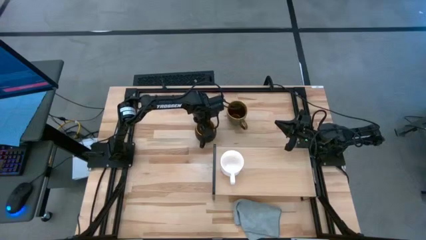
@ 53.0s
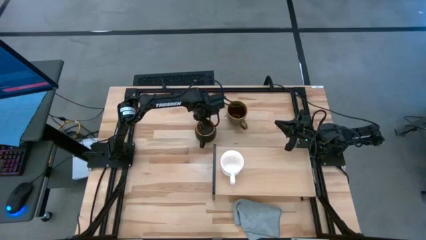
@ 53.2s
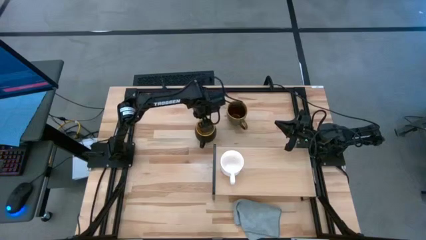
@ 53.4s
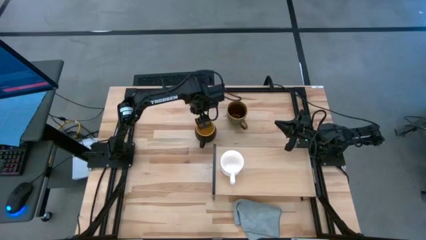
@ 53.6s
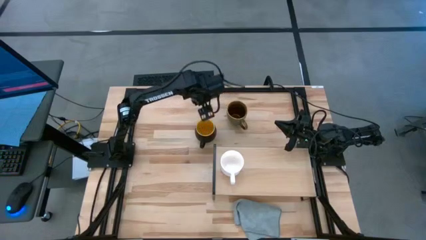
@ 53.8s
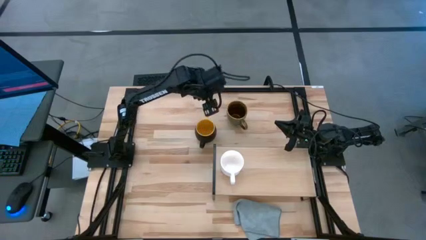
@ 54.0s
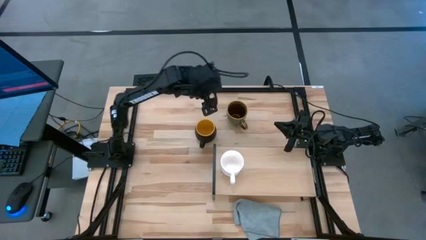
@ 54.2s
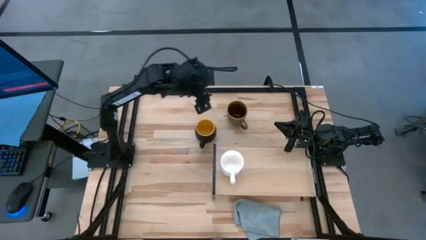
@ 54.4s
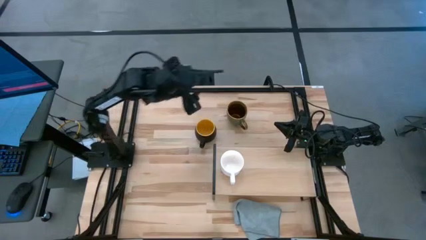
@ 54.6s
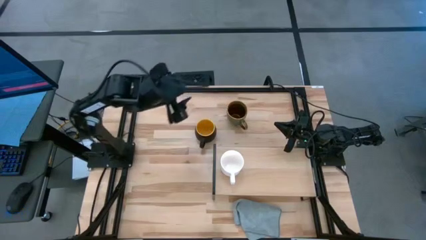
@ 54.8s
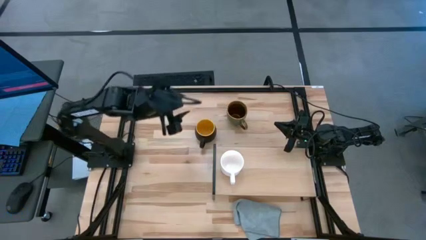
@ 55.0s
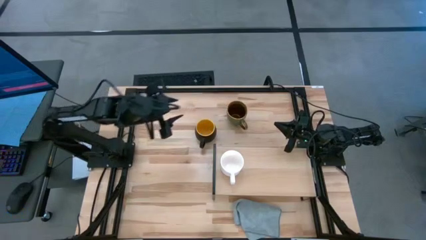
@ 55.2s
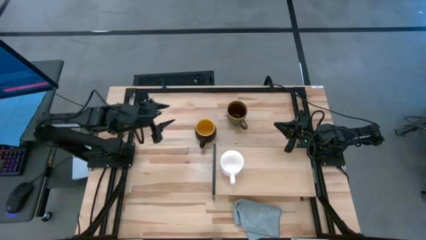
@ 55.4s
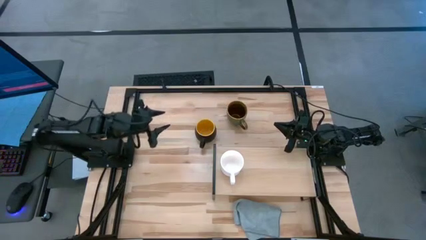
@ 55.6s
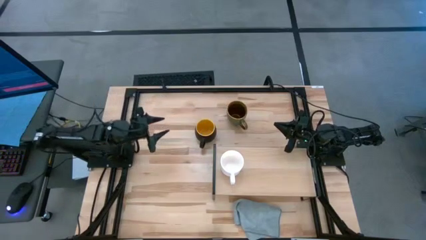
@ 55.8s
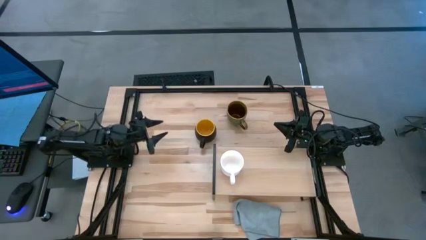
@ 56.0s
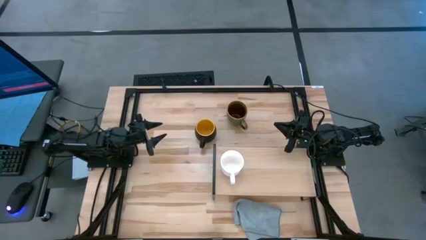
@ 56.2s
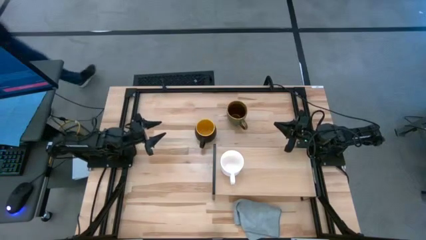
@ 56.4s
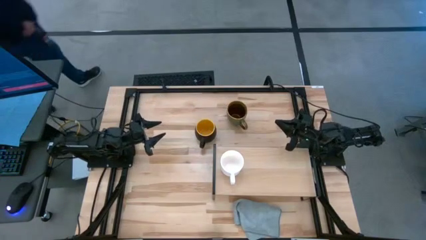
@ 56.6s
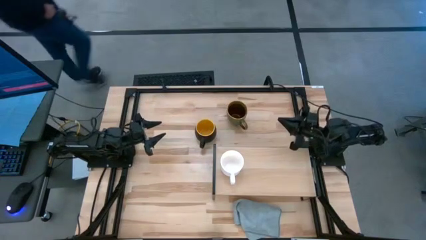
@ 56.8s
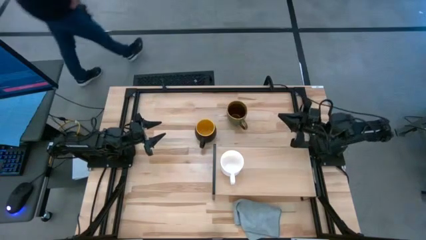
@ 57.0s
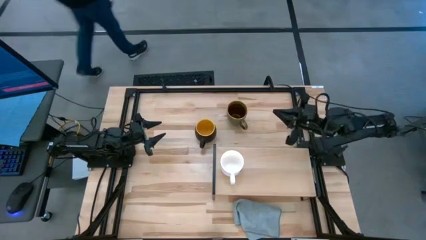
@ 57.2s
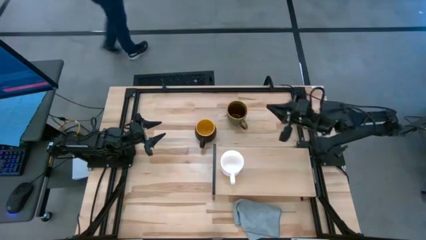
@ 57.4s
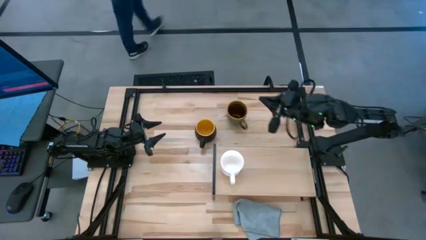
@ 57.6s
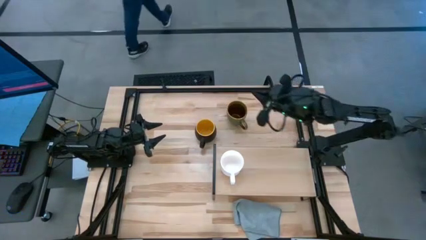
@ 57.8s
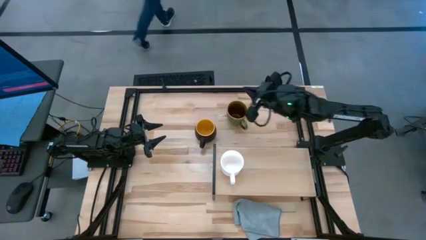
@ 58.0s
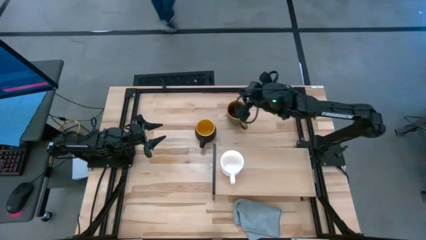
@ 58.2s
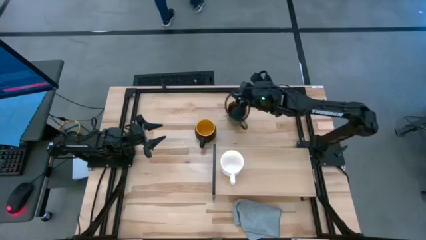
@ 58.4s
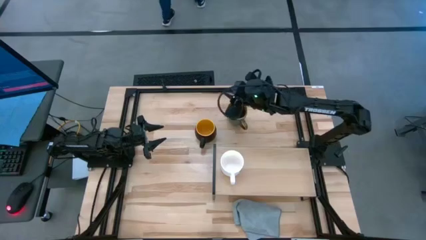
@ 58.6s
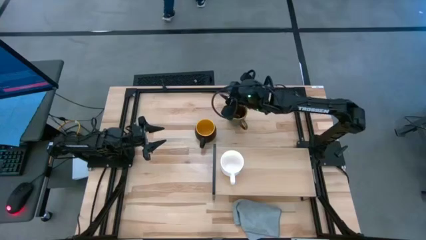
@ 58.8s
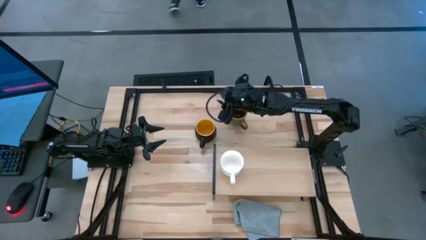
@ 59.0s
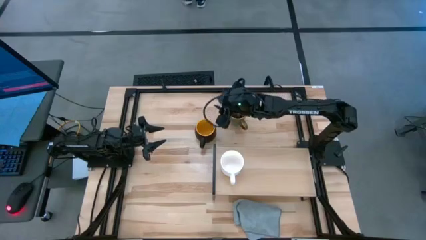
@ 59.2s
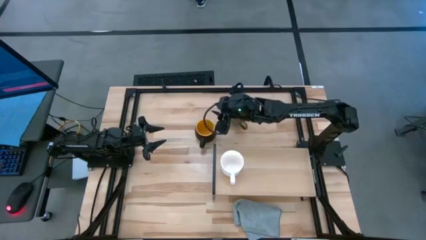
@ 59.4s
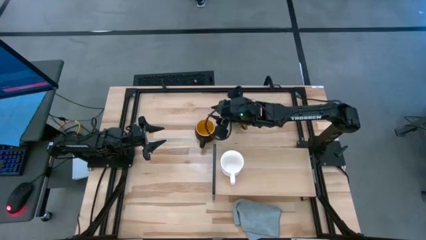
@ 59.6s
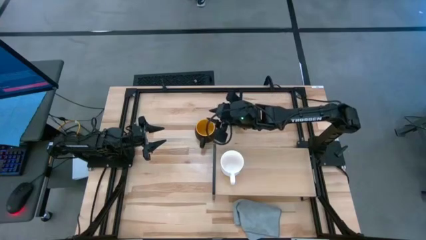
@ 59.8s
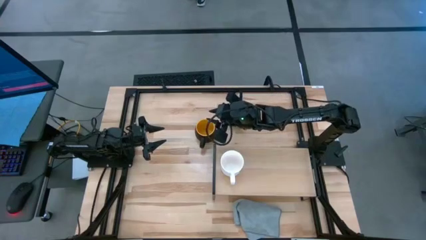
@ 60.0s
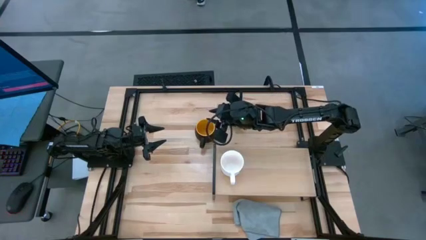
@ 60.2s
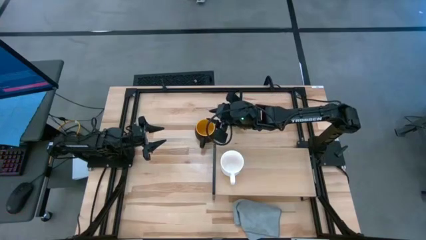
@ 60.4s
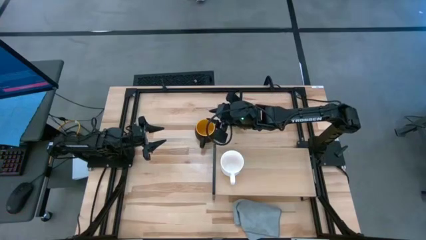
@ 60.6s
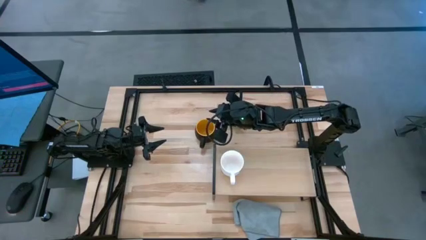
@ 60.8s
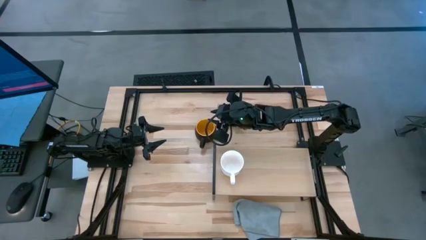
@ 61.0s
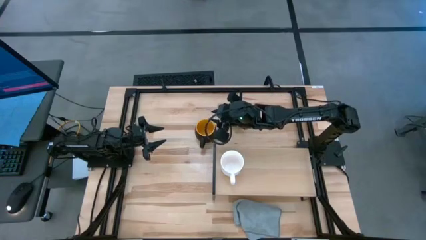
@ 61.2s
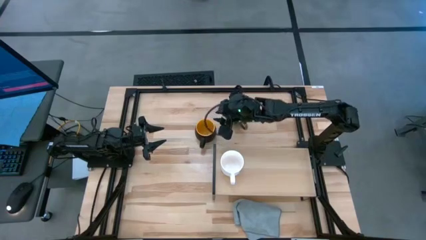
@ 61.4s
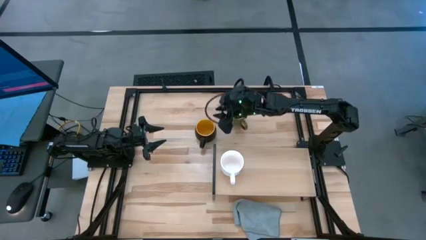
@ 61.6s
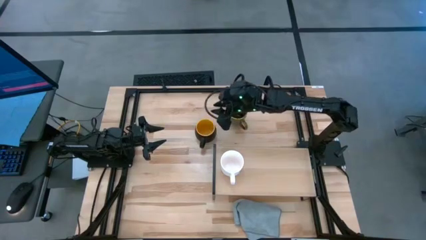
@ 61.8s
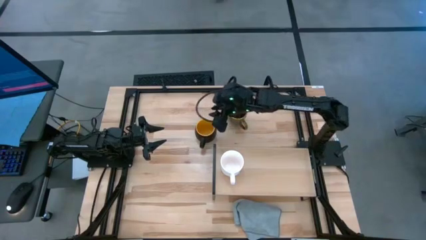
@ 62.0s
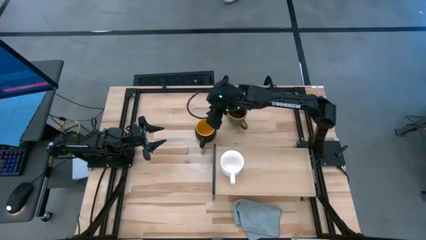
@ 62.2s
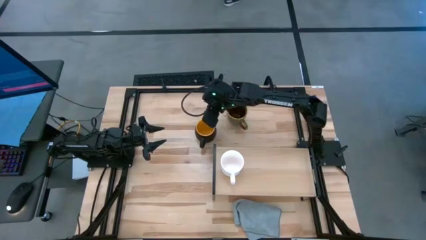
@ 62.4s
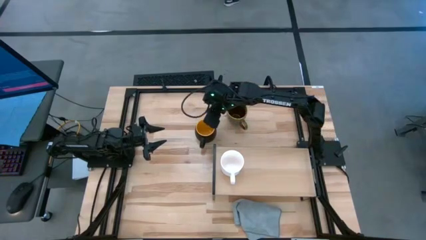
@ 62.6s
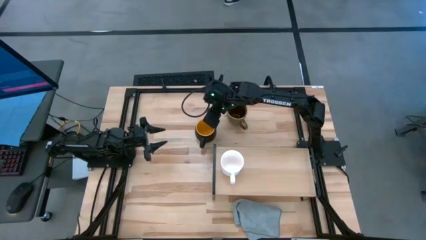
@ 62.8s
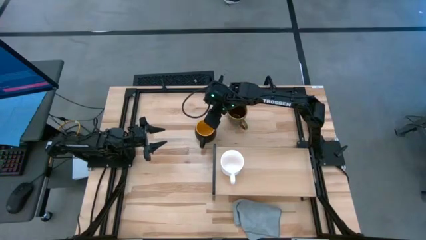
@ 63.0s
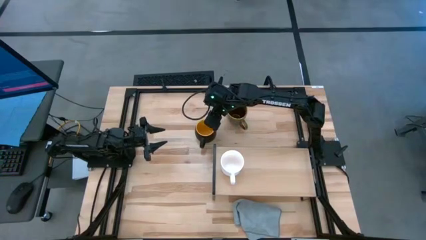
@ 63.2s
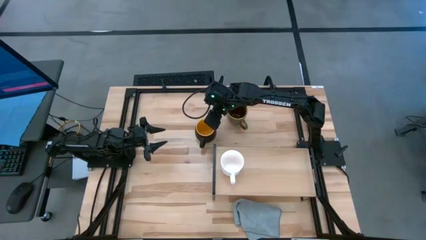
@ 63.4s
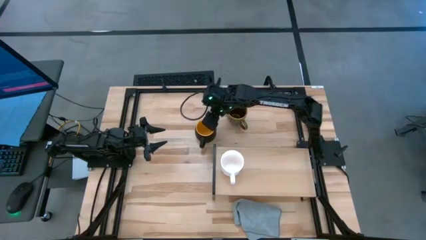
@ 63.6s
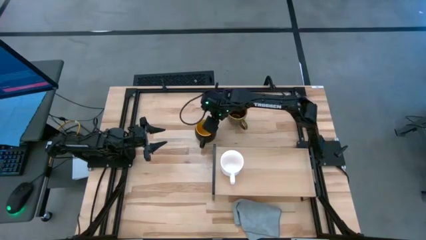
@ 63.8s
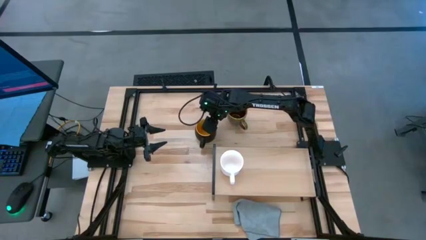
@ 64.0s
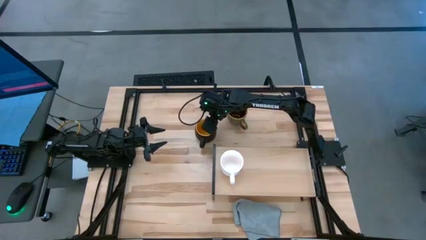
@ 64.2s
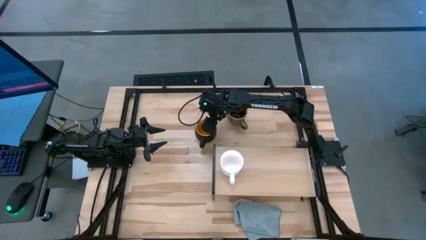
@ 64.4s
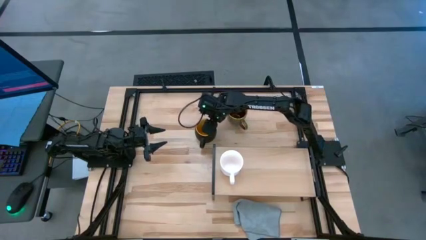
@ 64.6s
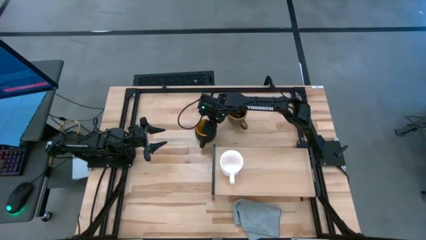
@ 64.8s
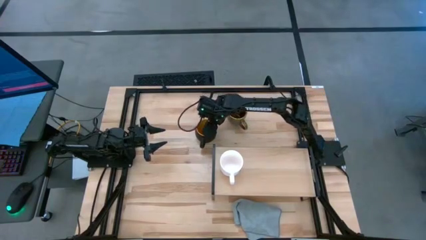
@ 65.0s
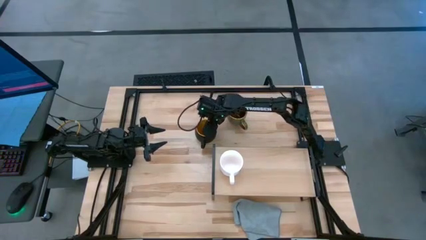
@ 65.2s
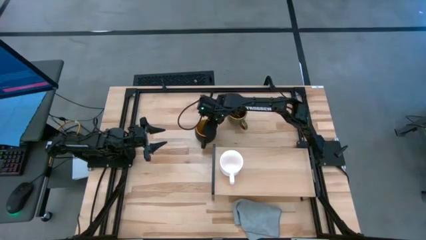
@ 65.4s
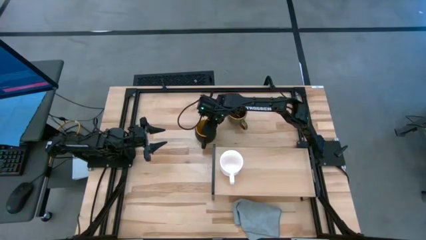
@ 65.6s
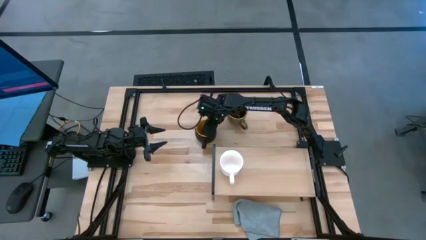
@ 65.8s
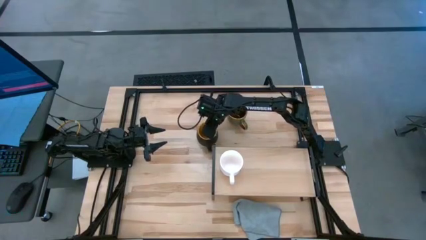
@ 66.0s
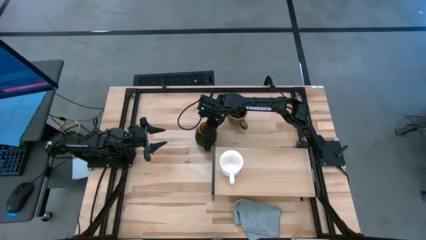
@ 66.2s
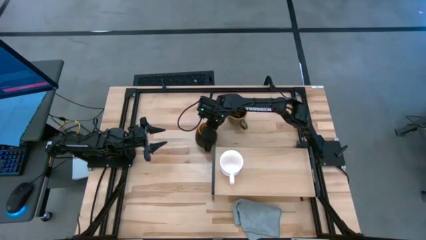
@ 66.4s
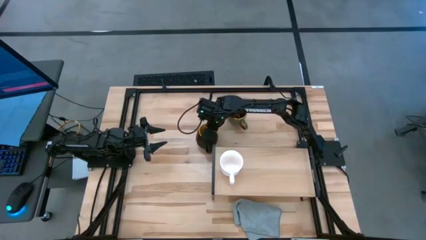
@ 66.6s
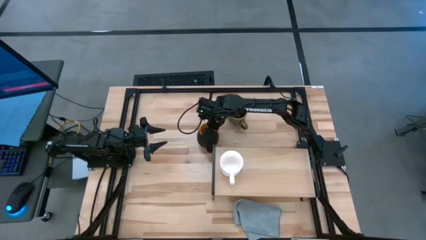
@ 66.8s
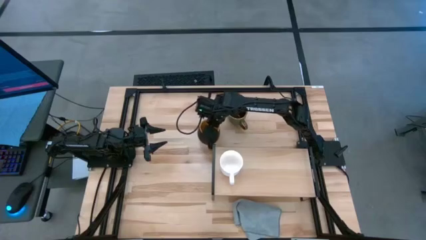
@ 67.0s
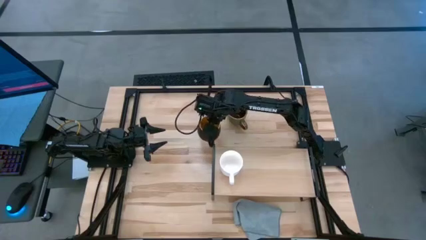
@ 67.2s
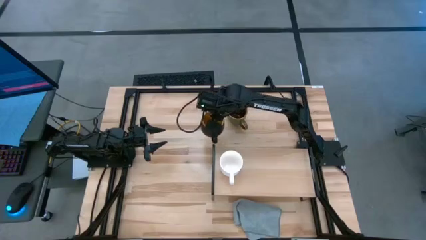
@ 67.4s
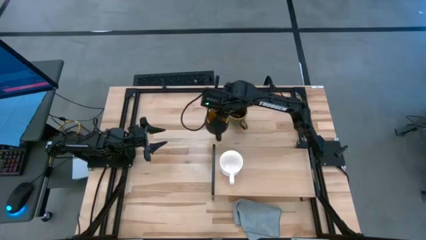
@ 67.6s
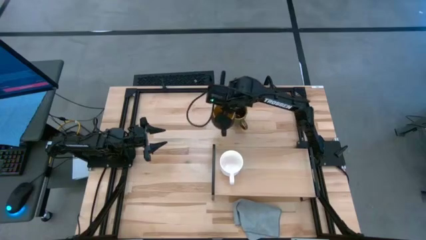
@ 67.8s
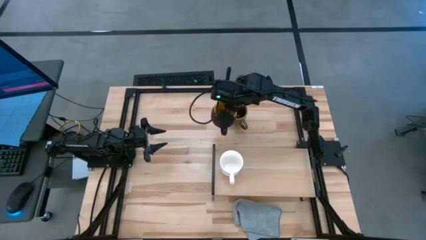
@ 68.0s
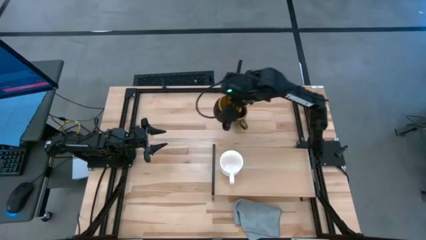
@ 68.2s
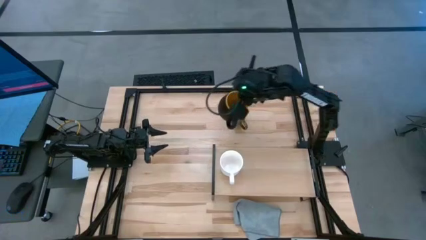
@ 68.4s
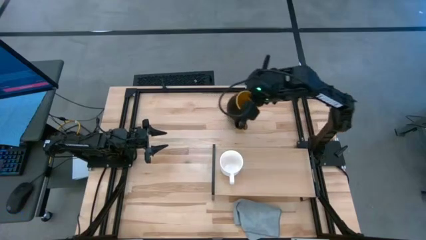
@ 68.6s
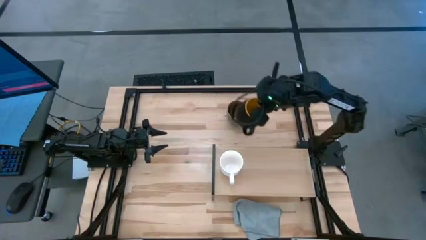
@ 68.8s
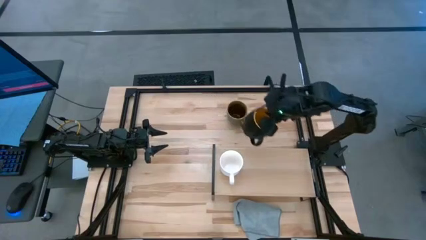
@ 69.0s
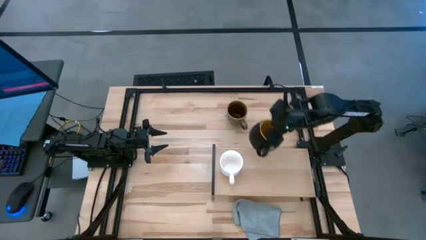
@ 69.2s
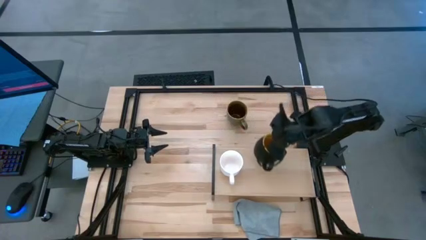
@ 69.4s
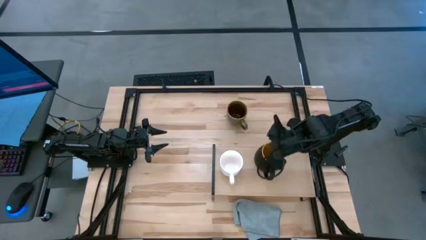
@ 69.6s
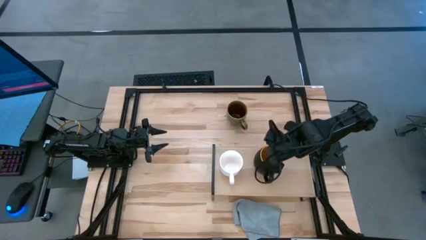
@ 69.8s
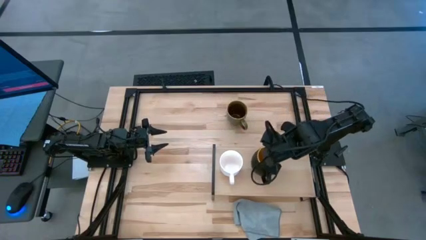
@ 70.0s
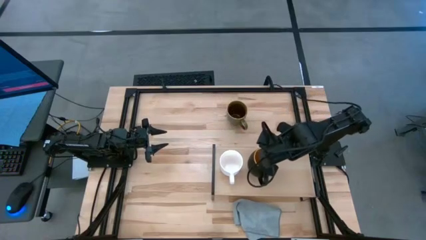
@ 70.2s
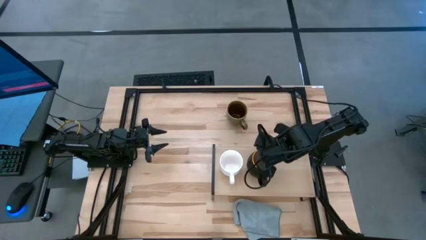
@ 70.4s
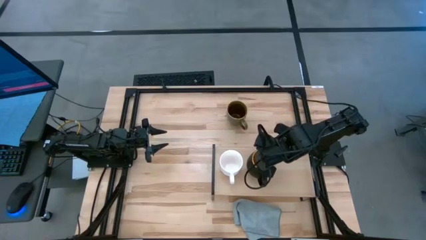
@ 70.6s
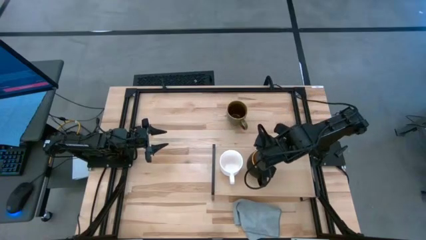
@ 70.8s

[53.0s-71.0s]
Task: Stack small to large cups/mugs on shelf
Put the black mug on the shelf
